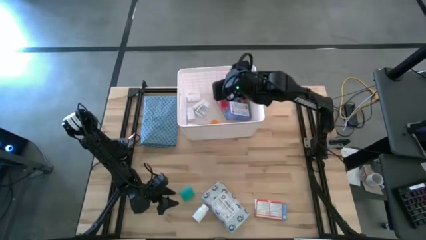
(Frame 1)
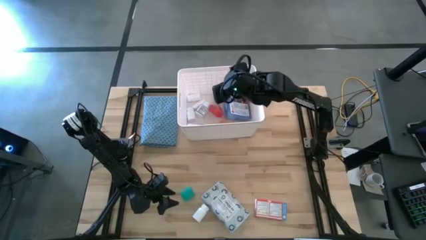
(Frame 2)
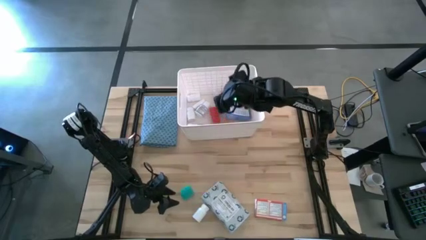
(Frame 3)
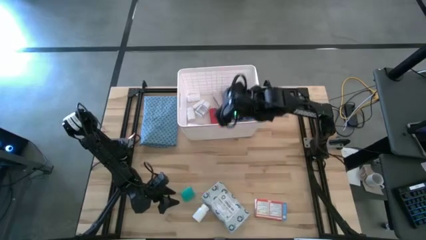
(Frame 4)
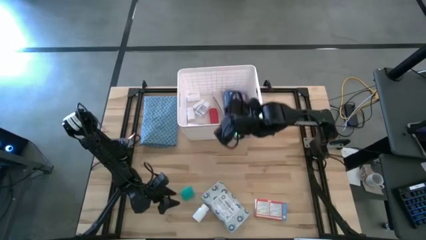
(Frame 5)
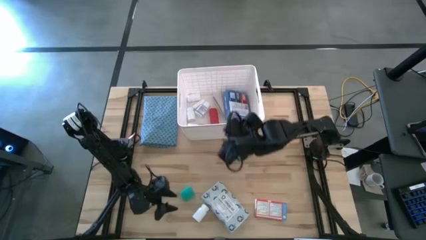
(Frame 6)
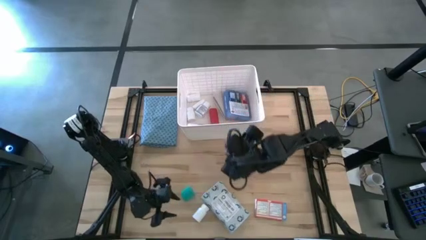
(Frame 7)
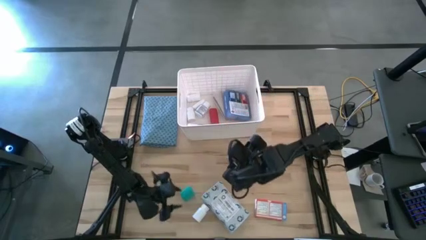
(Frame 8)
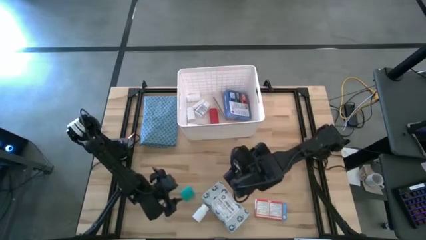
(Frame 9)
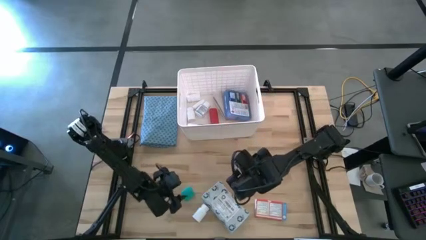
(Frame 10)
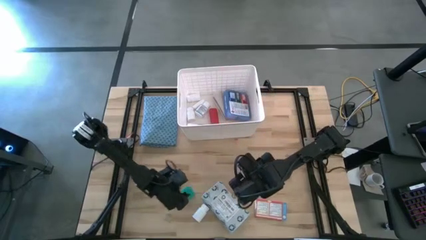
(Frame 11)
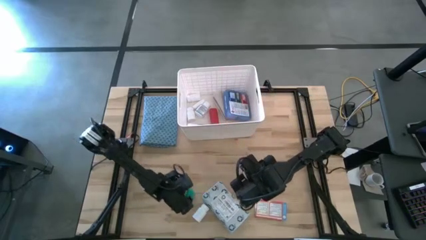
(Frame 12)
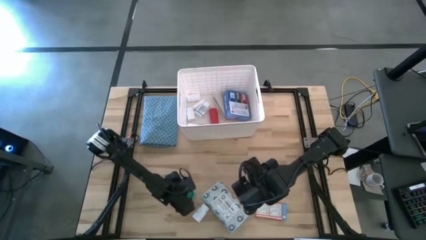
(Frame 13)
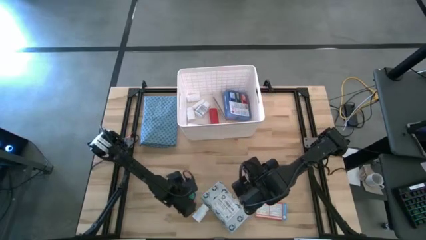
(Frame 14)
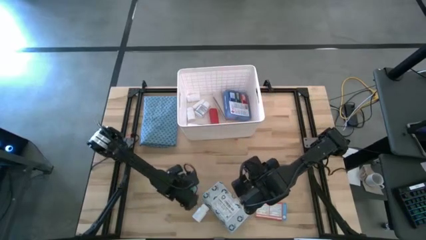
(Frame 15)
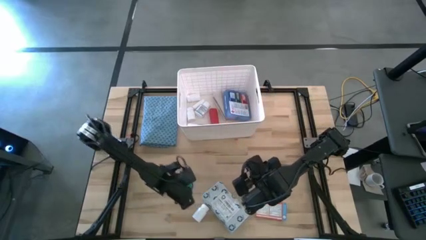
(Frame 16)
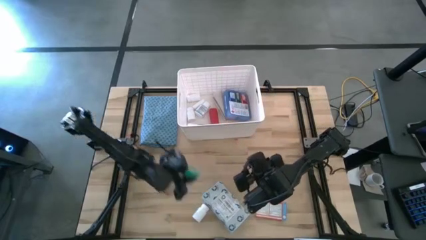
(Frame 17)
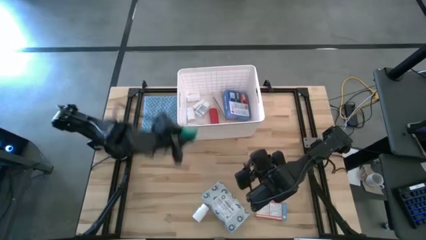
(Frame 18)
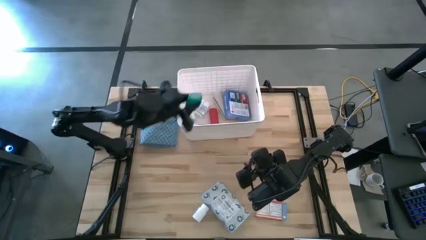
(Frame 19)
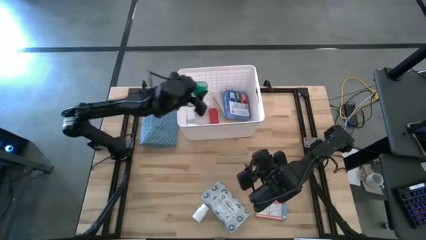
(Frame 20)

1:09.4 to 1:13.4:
Task: Pick & place medical supplies in basket/bin
Put the rolled green bandage into the white container

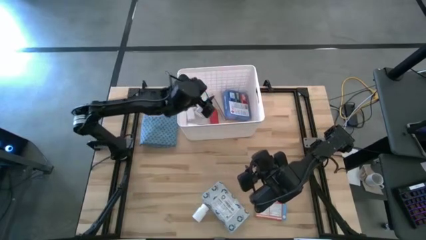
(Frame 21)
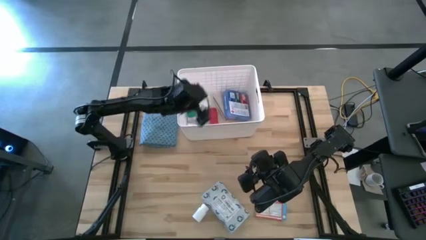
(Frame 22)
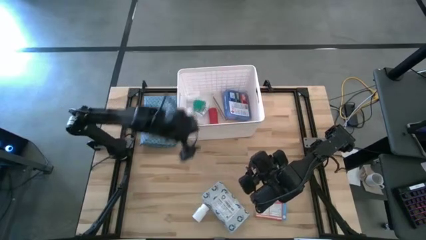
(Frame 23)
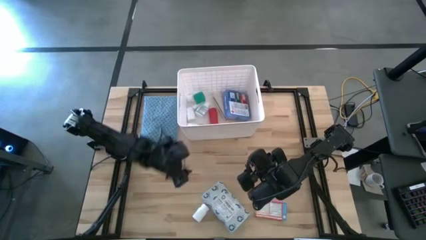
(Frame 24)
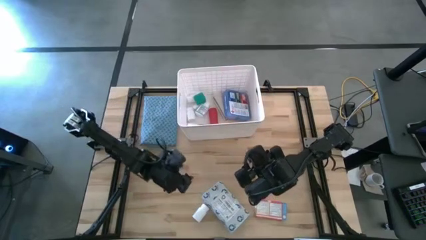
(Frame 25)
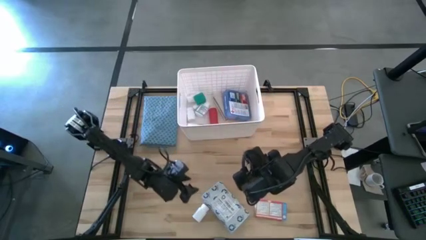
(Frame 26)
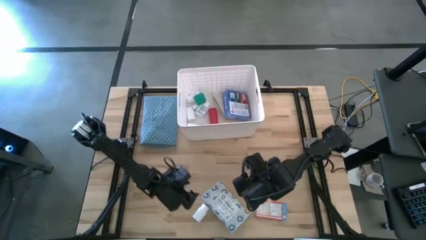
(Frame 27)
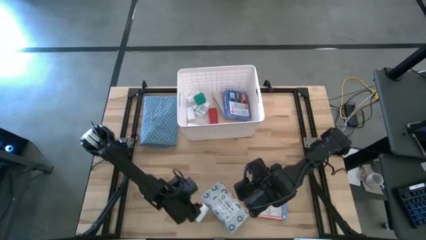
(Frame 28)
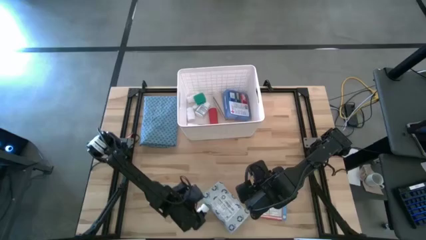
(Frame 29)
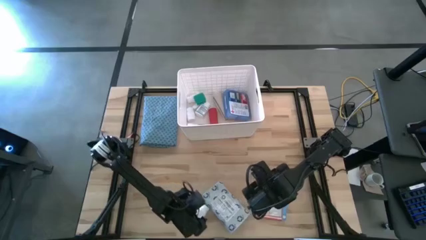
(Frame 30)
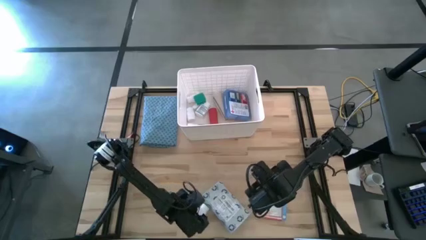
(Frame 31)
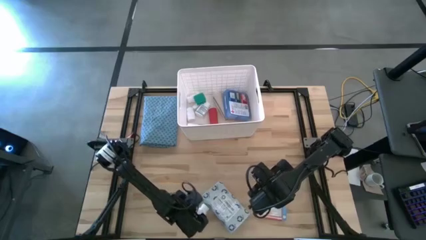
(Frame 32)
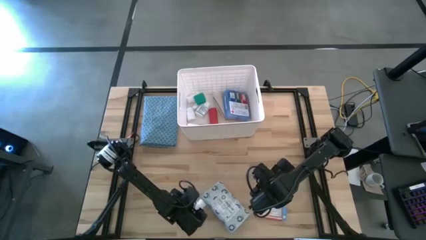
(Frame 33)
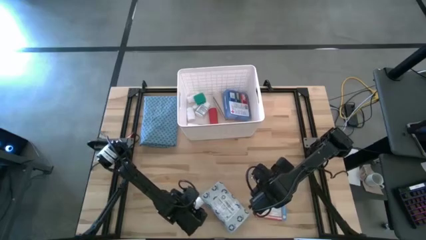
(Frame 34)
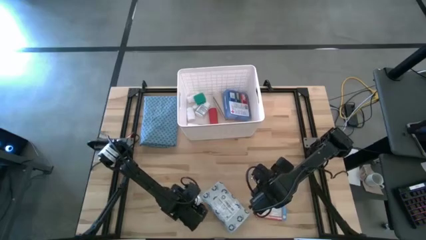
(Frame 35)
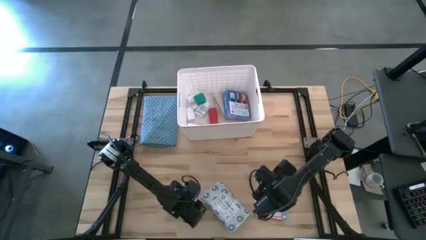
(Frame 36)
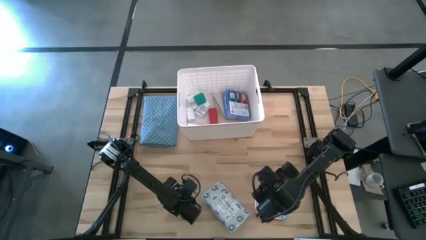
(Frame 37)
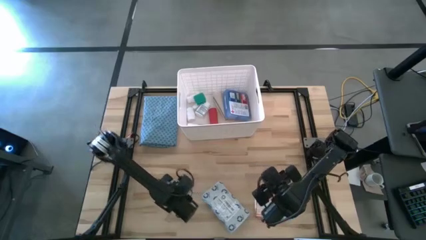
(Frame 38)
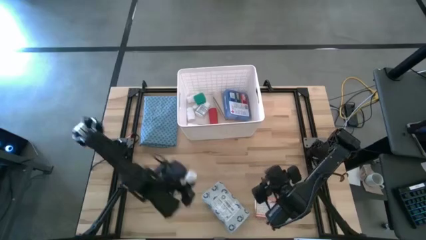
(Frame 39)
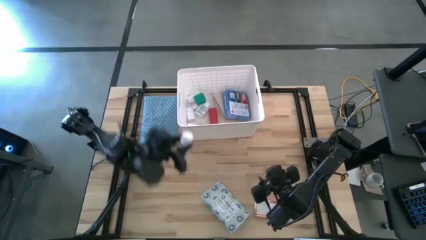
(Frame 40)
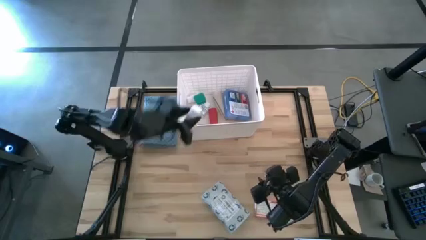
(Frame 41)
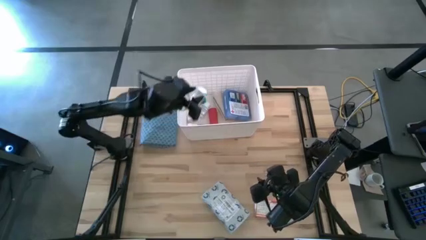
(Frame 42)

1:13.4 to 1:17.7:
Put the white pill bottle into the white container

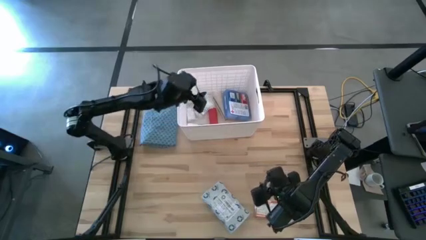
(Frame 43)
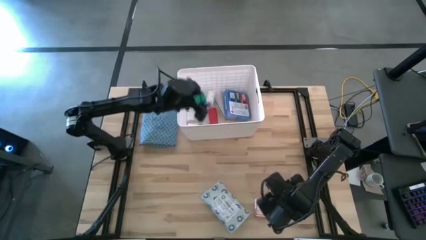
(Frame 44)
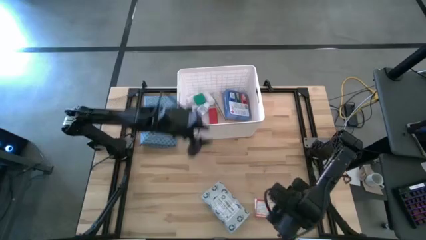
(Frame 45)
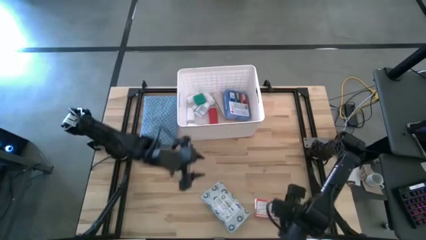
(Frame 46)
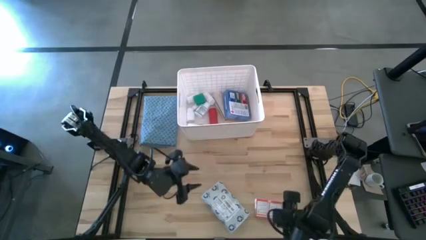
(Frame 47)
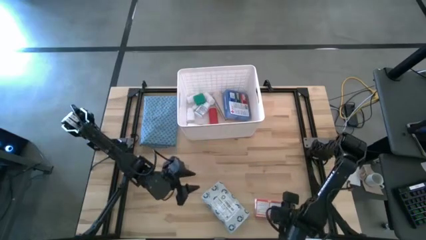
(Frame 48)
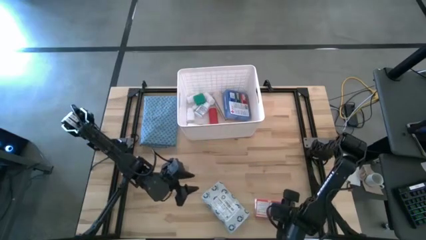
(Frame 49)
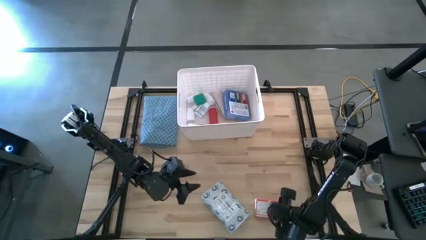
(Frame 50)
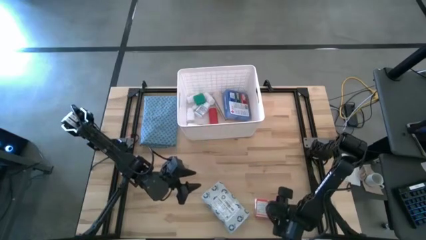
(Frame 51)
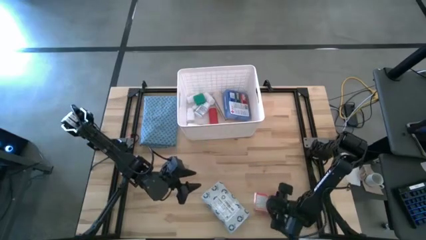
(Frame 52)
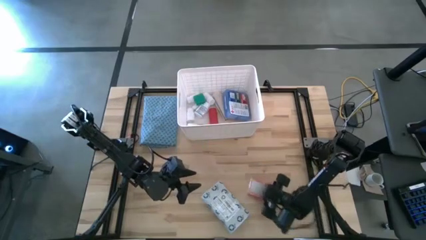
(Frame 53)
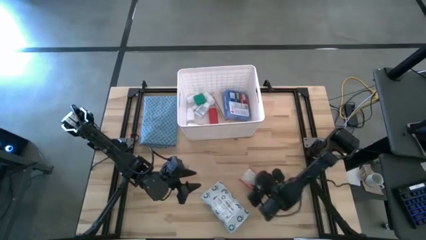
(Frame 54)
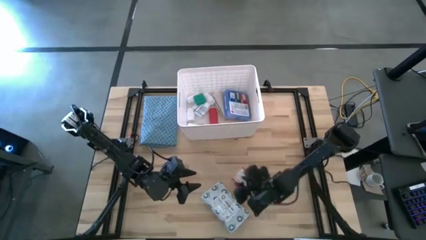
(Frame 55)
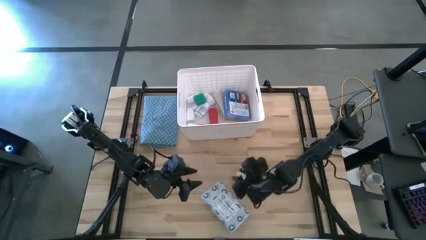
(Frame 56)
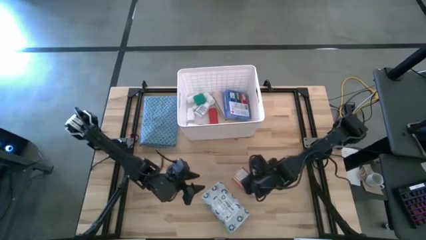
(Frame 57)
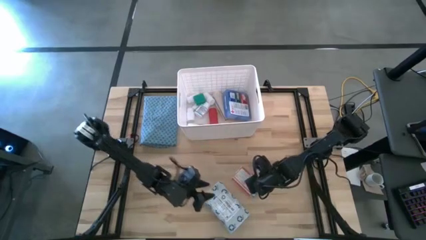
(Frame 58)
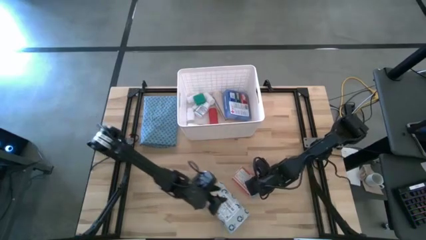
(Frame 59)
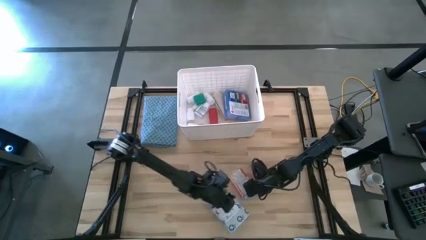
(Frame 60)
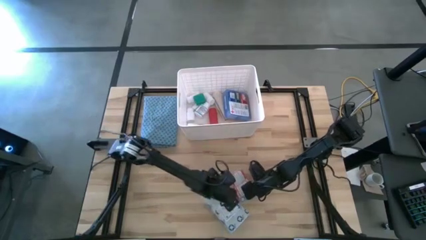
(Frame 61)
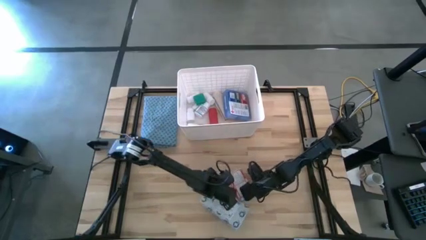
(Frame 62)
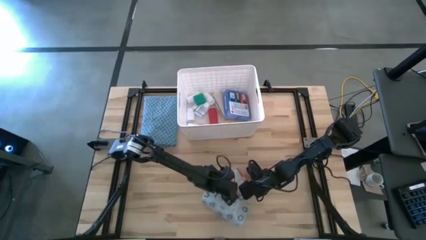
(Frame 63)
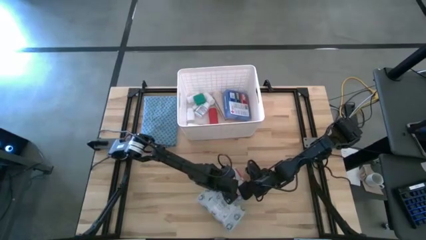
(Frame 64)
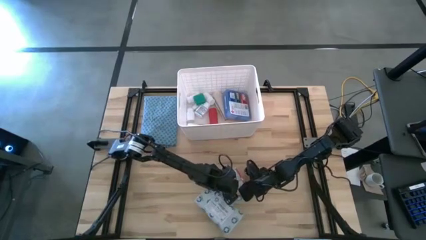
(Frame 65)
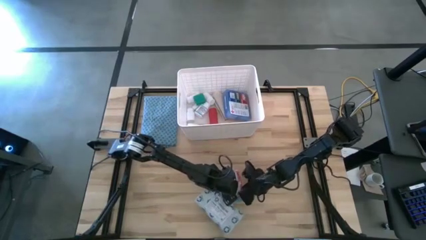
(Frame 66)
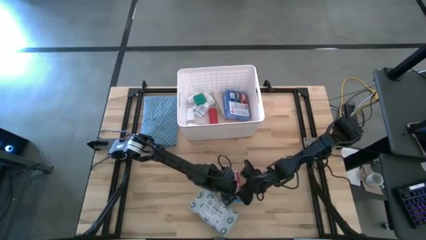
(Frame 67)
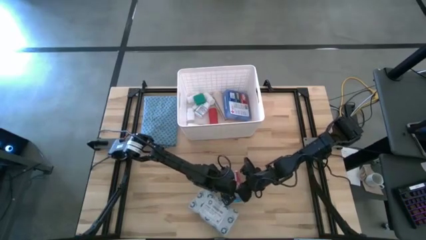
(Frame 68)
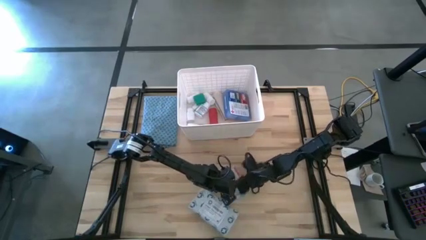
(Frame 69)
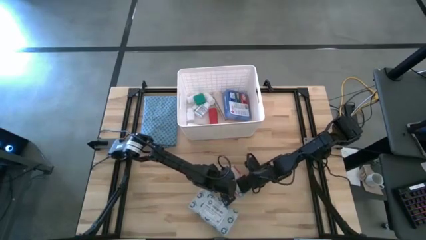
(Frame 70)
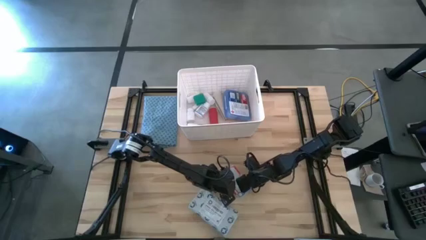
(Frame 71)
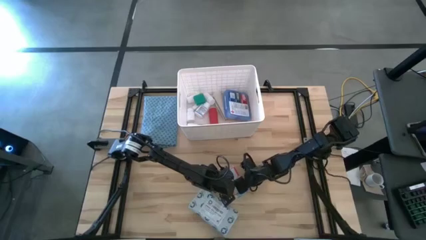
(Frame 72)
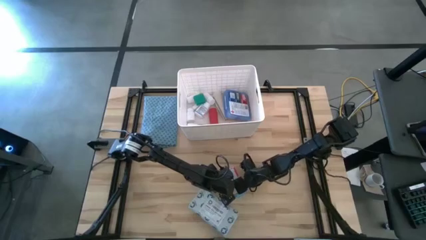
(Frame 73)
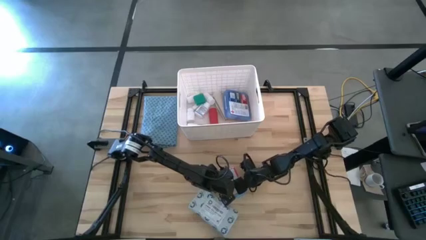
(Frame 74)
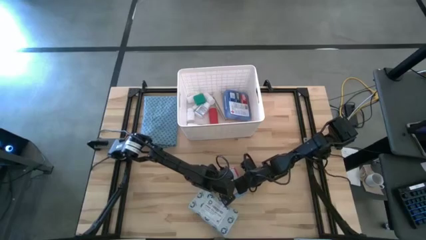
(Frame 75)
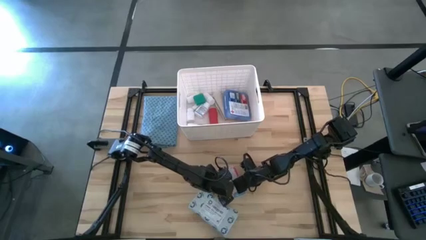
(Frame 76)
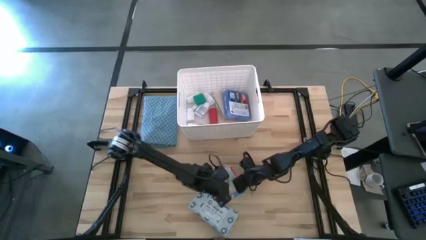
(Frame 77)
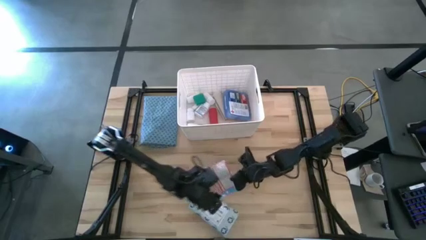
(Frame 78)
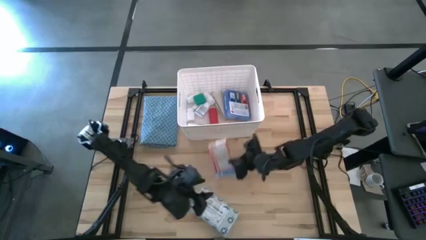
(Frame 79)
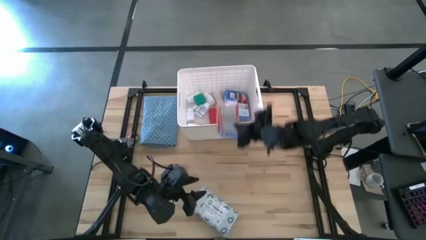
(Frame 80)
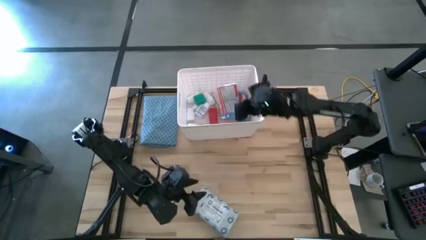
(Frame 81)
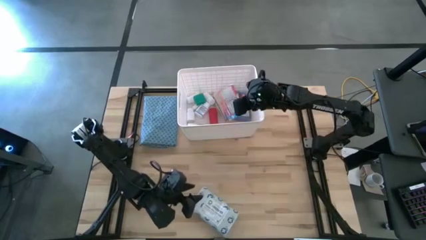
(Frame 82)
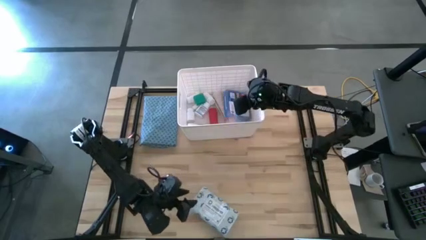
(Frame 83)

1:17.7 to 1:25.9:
Put the red bandage box into the white container
